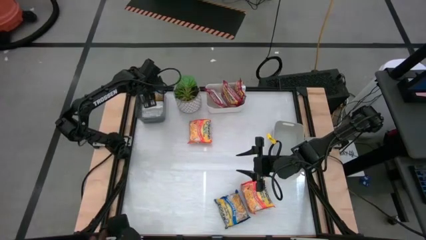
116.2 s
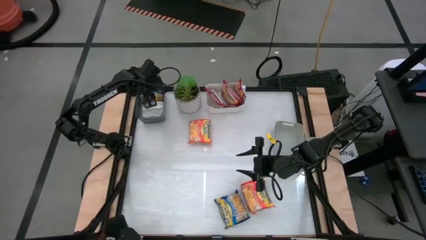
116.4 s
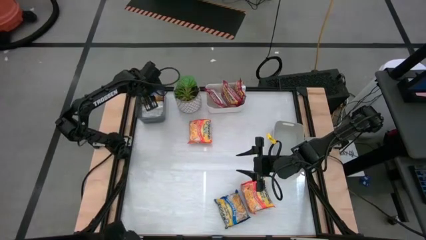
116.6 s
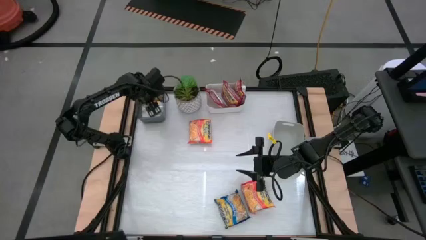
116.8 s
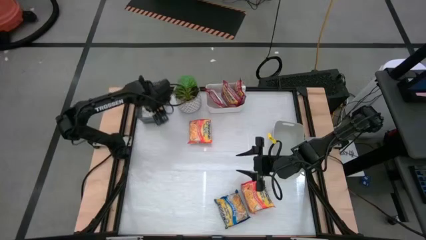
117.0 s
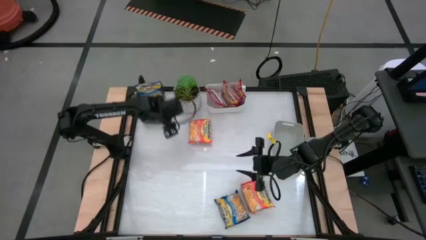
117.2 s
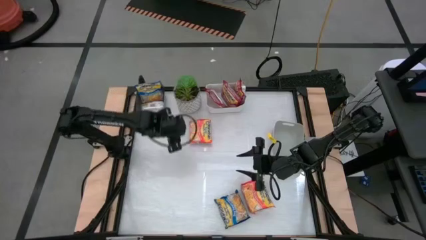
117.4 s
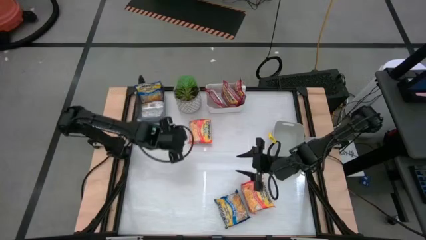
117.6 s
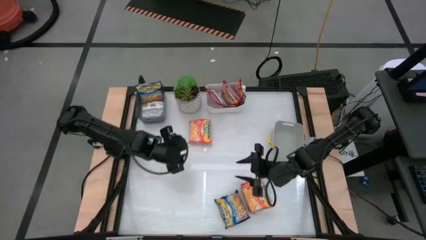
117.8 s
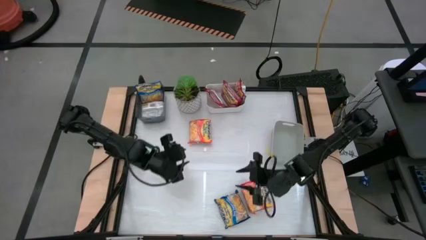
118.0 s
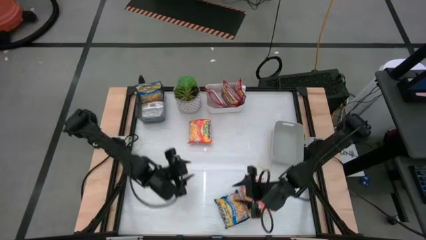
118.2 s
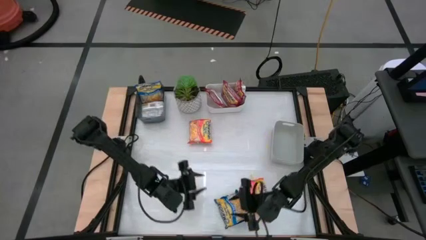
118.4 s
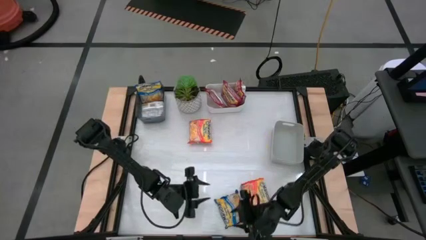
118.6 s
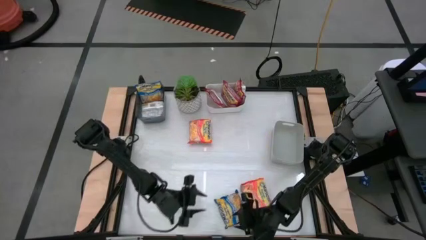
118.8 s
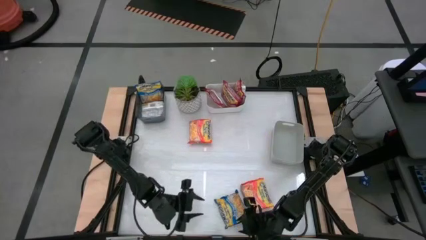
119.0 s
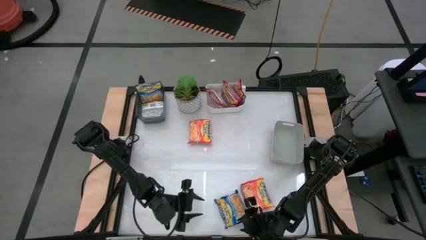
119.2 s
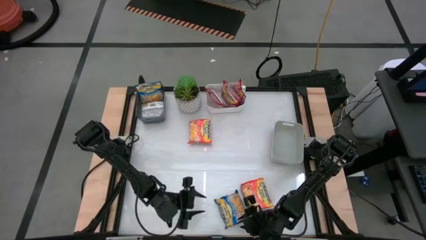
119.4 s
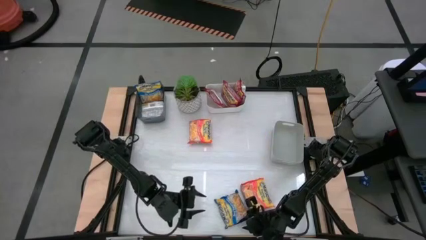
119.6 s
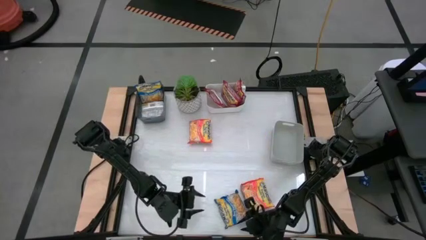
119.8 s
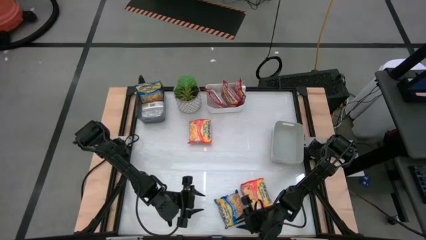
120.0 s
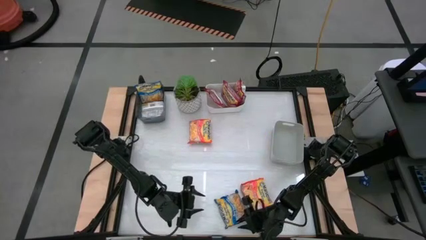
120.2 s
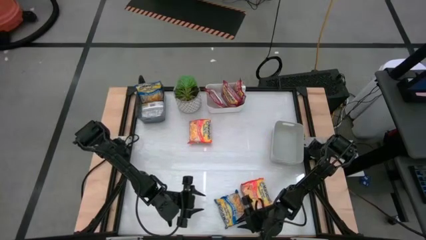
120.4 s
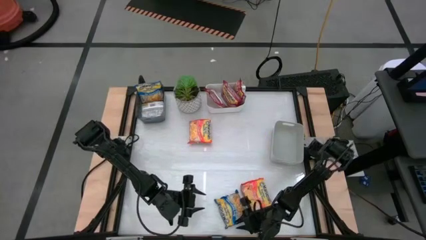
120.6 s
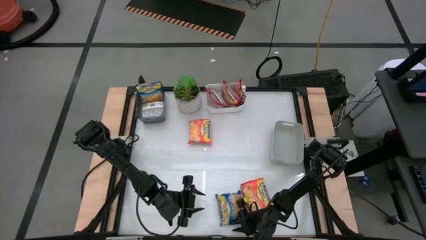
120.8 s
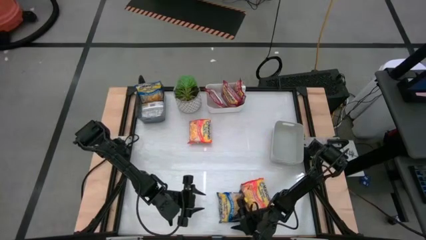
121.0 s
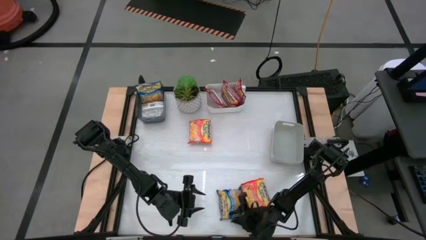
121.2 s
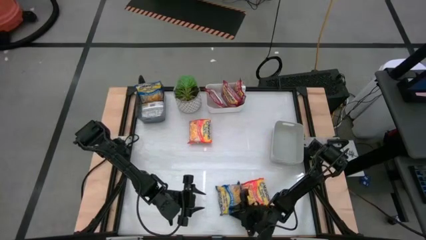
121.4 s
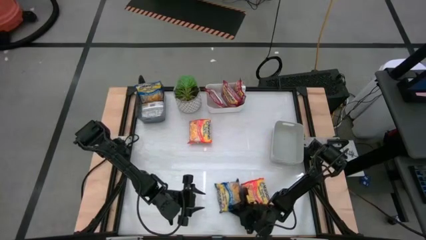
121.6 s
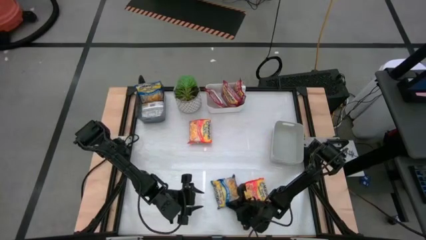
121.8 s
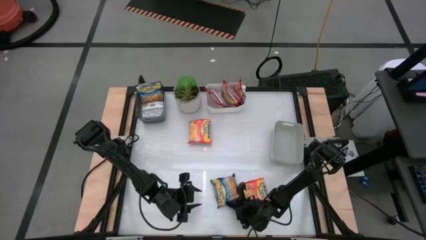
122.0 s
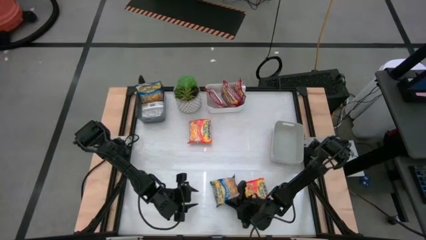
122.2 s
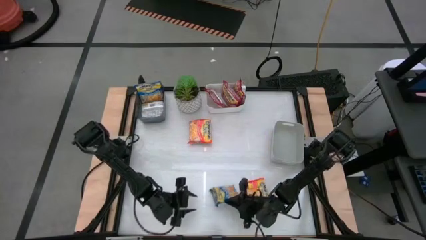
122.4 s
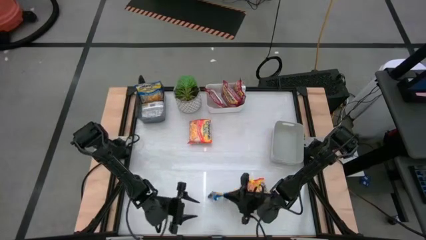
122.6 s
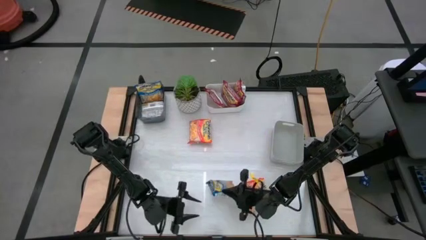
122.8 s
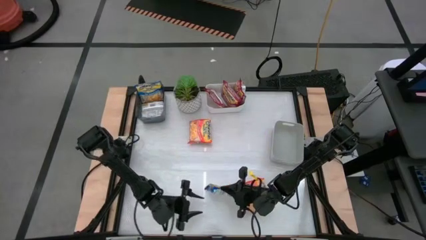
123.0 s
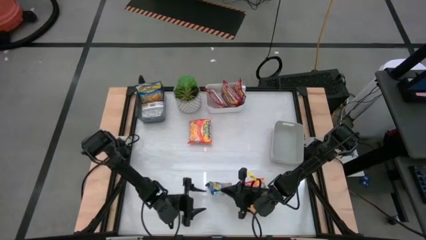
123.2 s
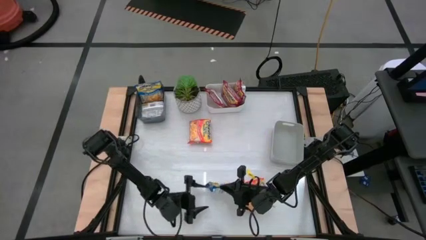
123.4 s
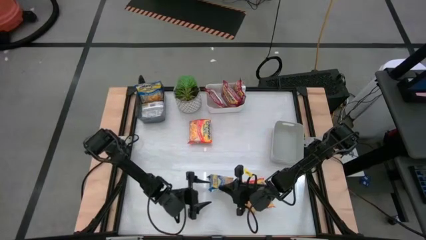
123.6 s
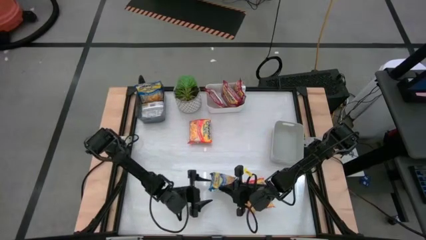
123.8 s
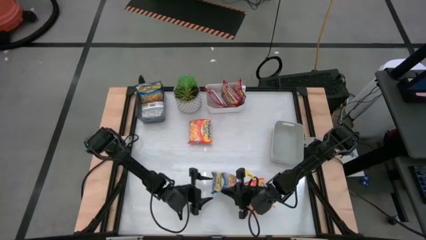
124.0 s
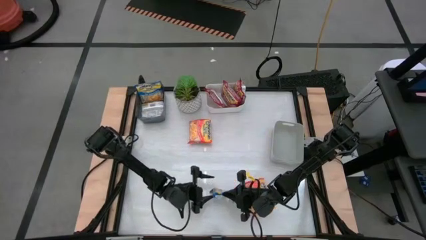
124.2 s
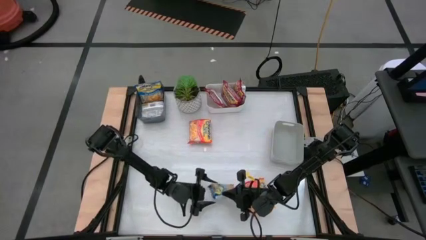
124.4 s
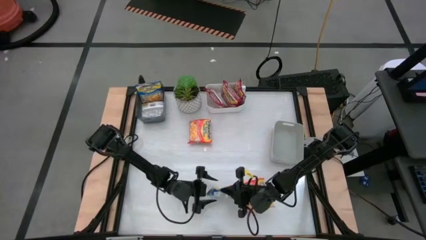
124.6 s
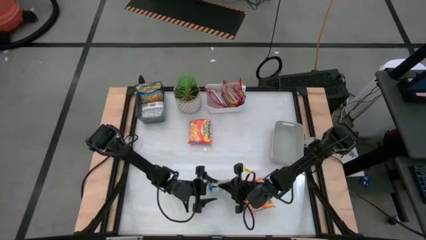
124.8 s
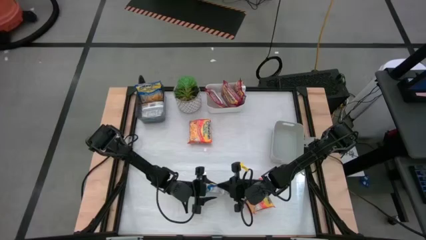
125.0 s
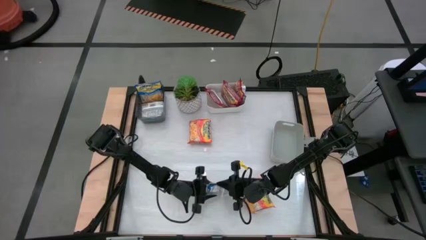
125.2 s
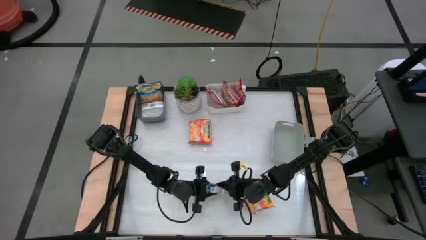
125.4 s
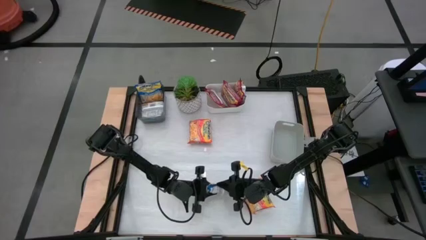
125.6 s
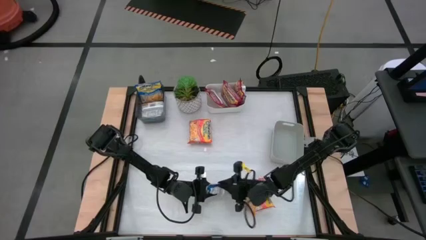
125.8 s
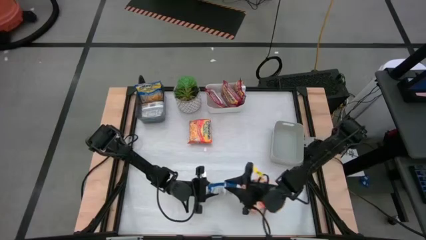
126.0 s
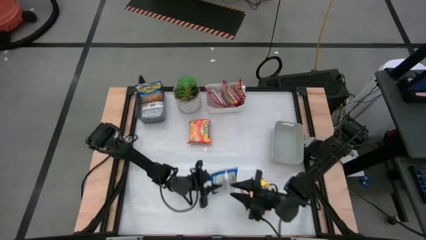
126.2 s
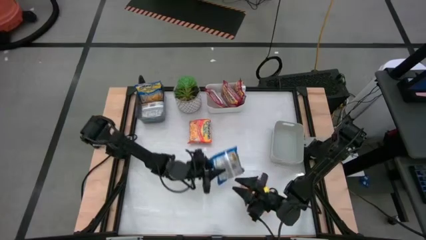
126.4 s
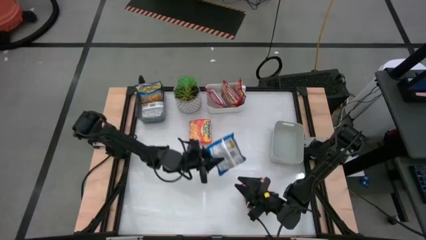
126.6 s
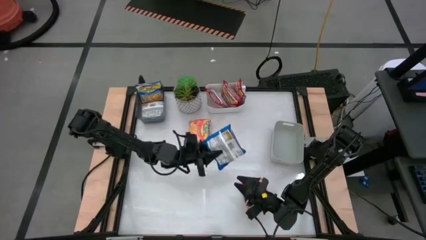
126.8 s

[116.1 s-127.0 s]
Task: Sort Maruchan noodles
Put the blue noodle pack into the black bin

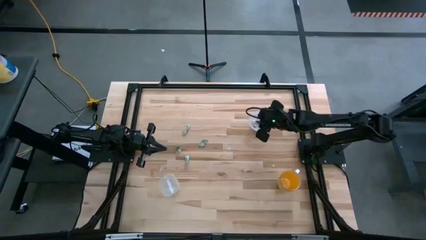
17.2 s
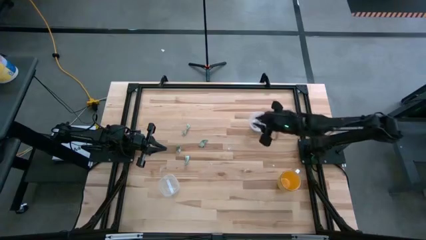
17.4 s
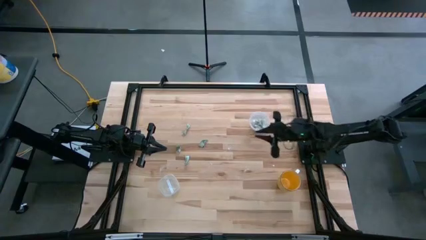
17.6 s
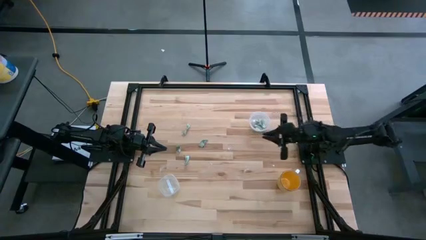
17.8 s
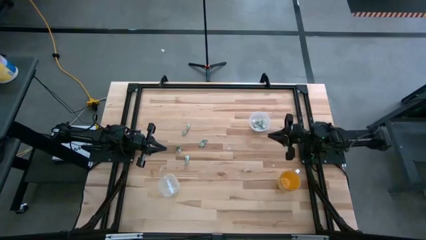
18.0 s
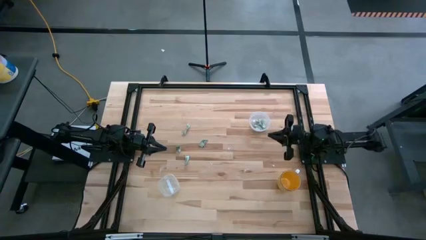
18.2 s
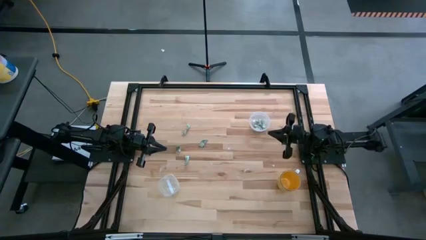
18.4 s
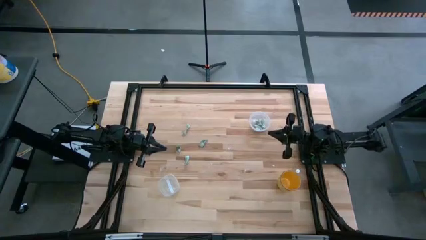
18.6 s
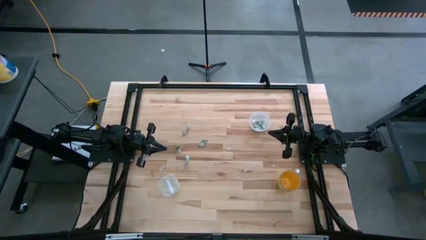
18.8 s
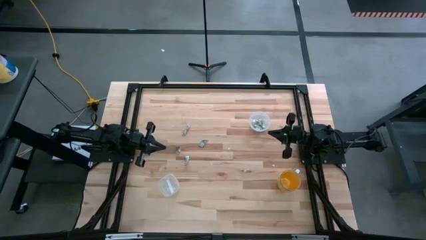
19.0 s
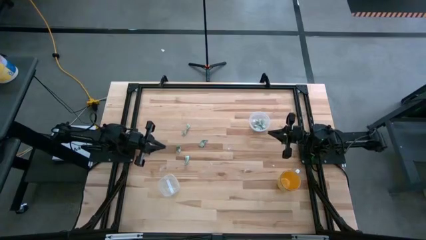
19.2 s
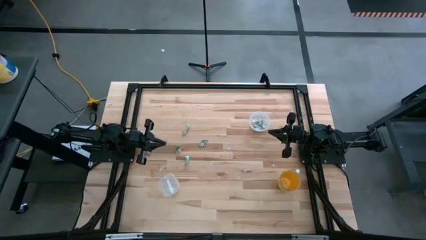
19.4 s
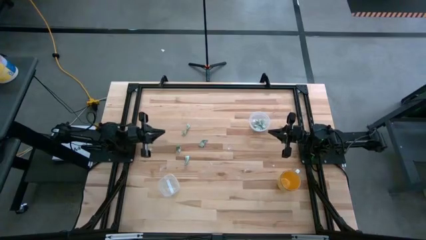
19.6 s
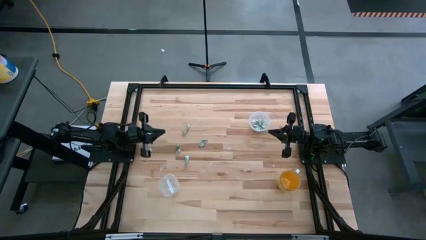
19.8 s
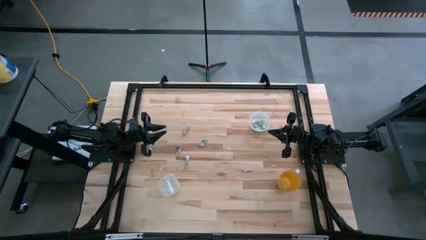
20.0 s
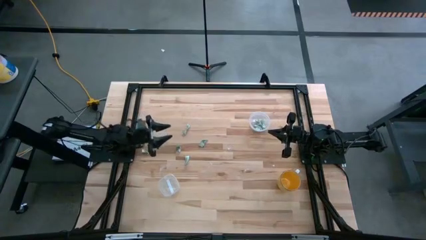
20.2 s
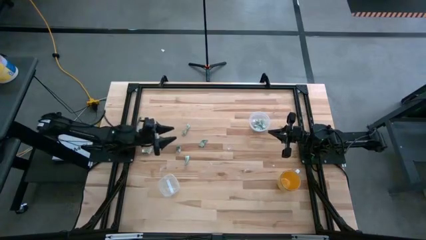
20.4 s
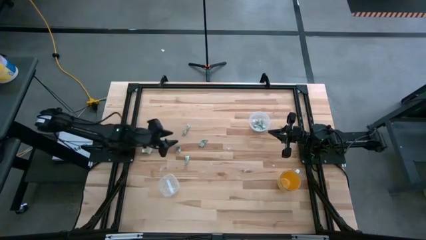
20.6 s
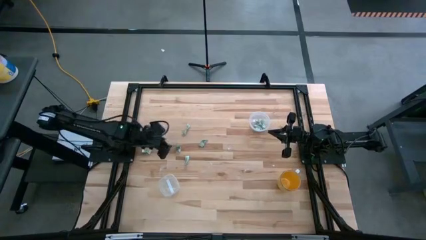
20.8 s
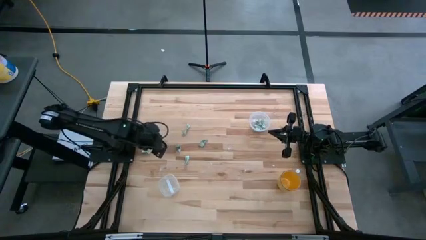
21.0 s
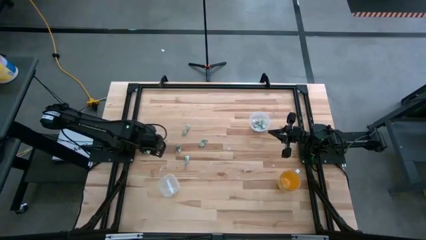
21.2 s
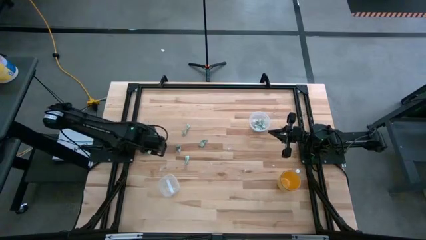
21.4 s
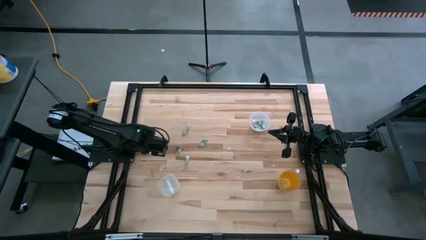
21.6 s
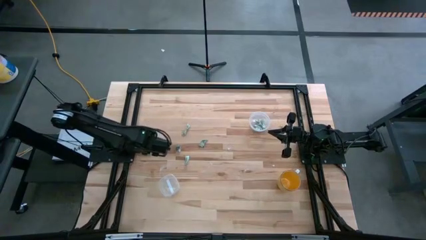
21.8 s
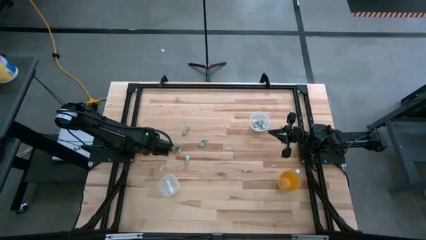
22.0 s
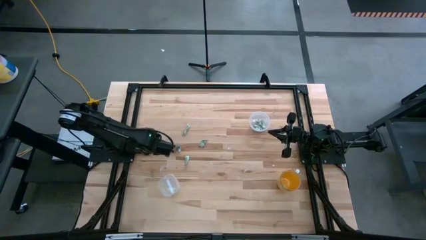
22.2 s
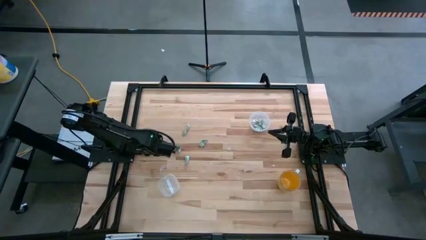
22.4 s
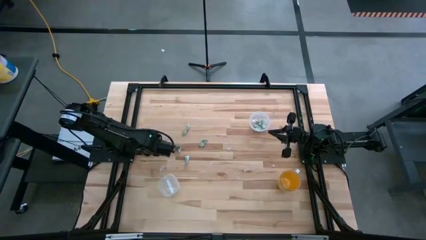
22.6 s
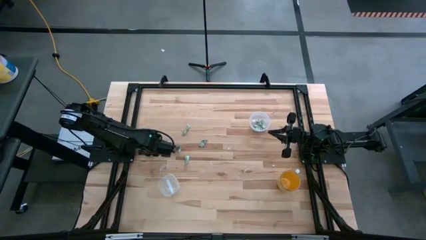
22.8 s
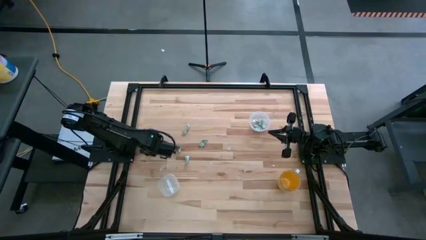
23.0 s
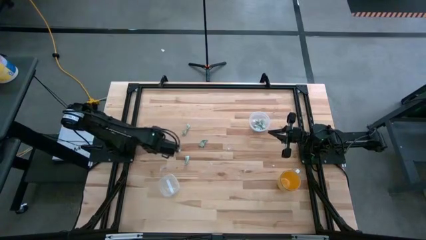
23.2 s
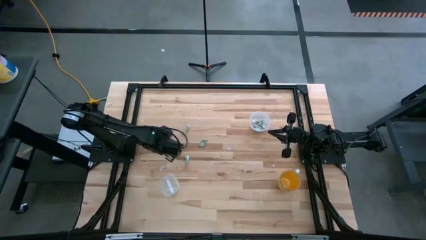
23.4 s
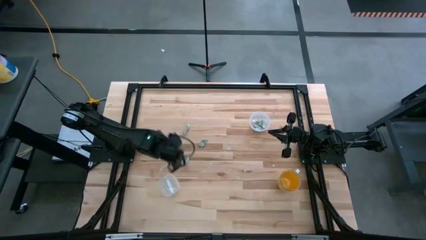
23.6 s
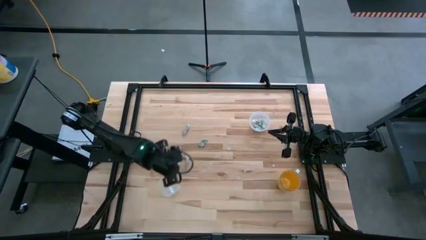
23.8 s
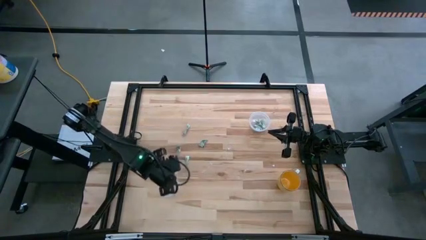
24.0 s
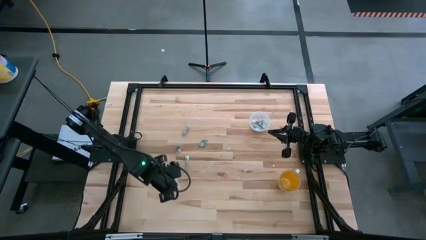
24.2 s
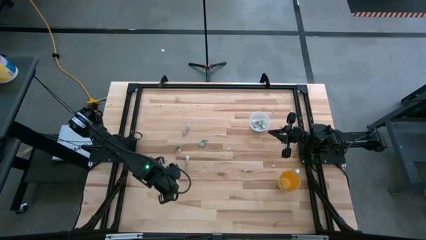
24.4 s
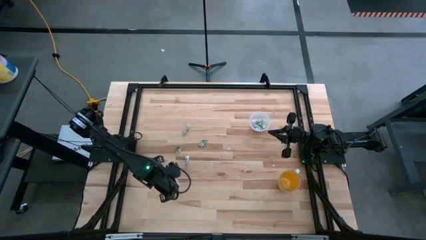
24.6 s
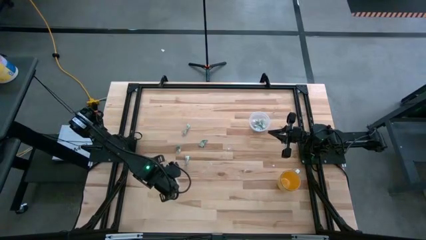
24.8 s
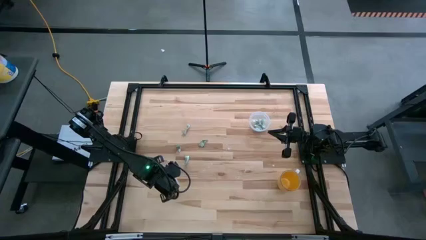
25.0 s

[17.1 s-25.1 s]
Task: Pick and place Stevia / Truvia into bins
Put the stevia packet into the oval transparent container
